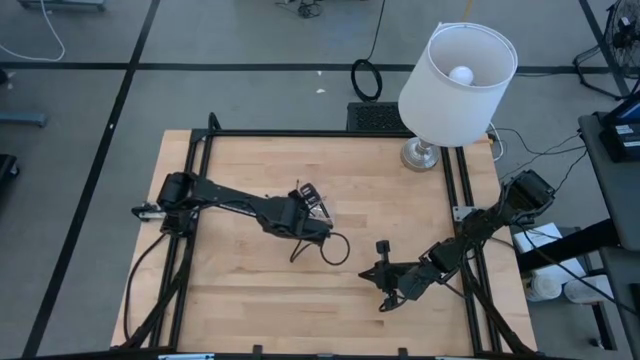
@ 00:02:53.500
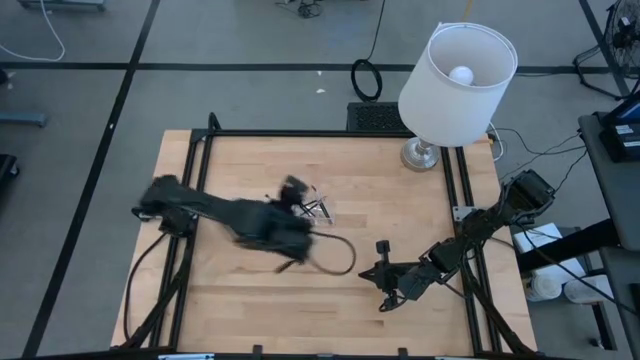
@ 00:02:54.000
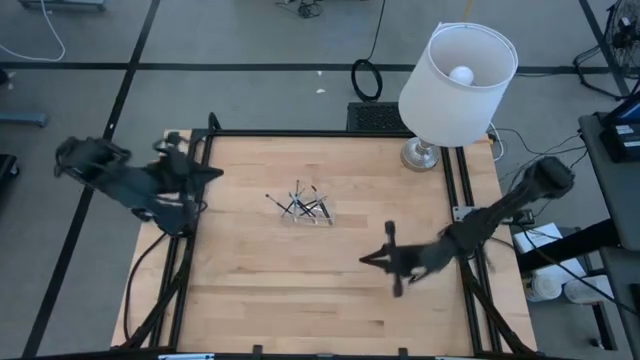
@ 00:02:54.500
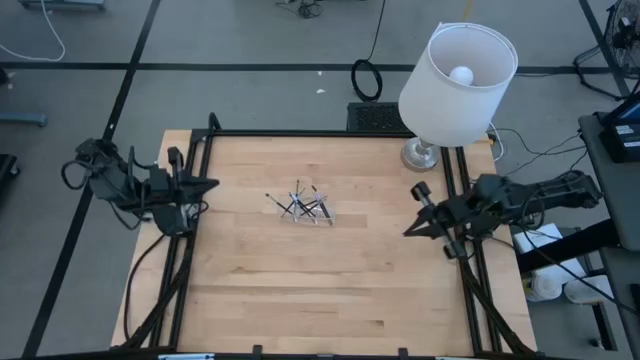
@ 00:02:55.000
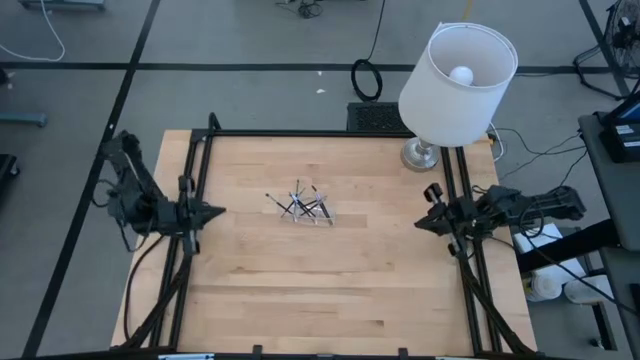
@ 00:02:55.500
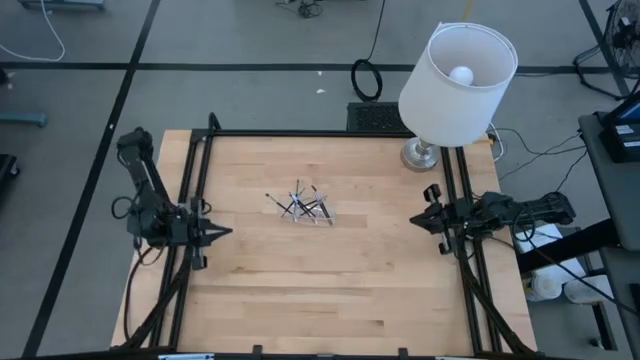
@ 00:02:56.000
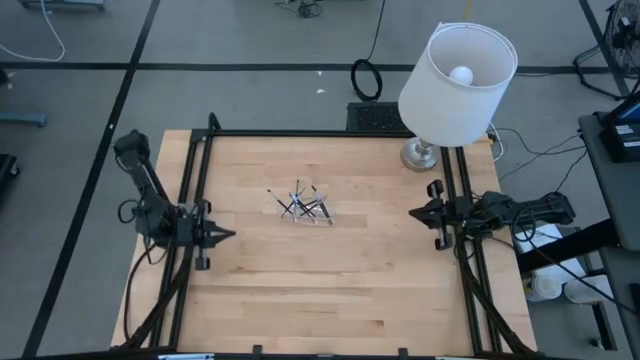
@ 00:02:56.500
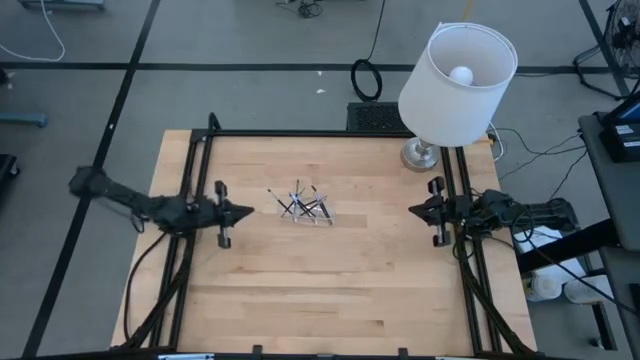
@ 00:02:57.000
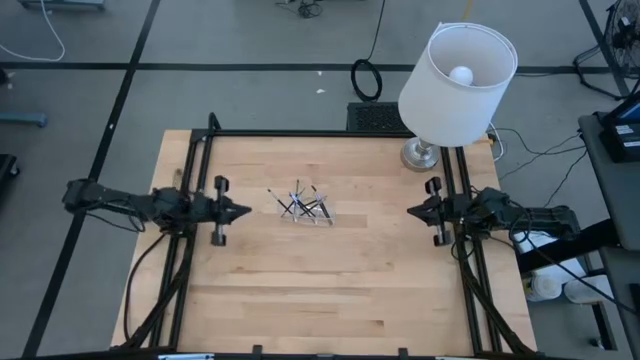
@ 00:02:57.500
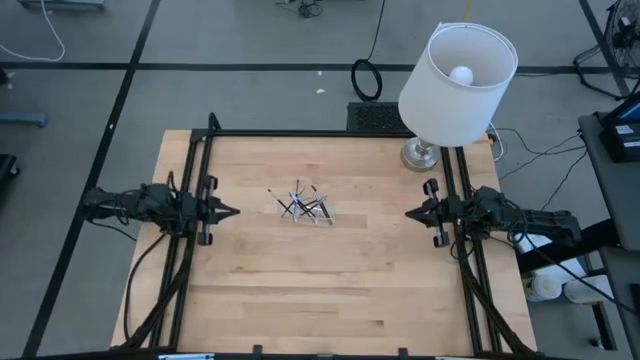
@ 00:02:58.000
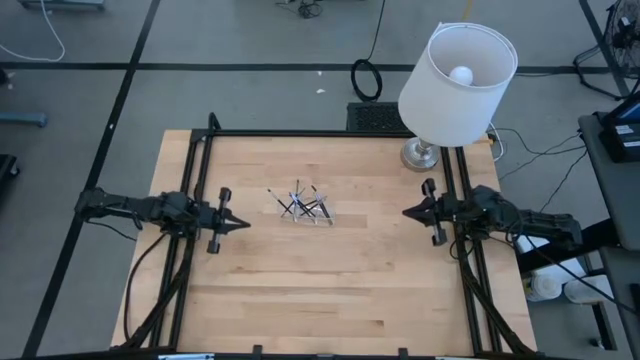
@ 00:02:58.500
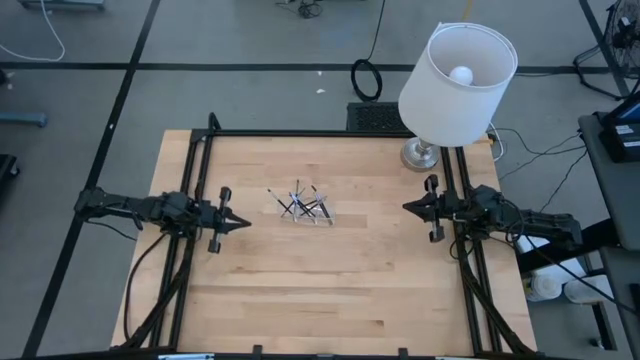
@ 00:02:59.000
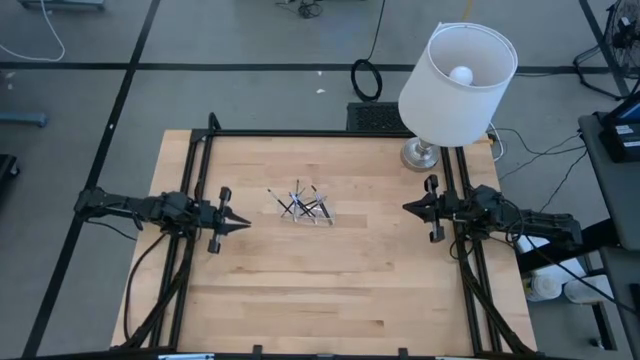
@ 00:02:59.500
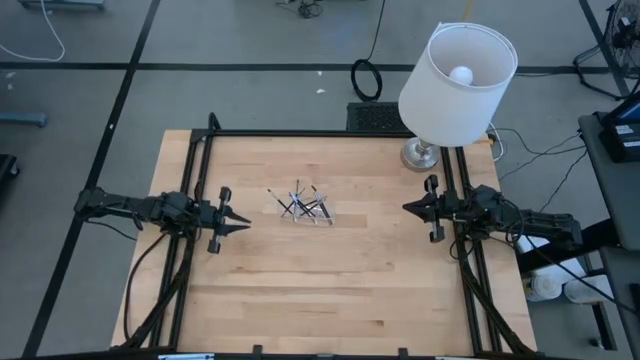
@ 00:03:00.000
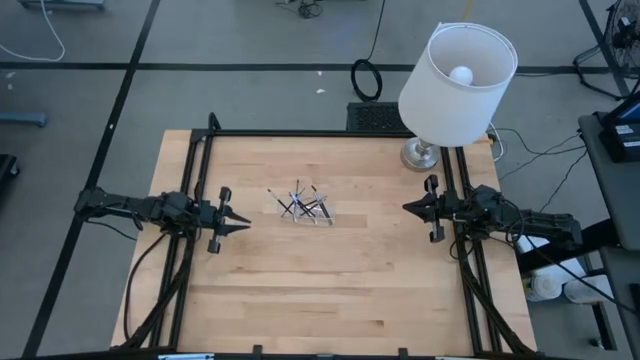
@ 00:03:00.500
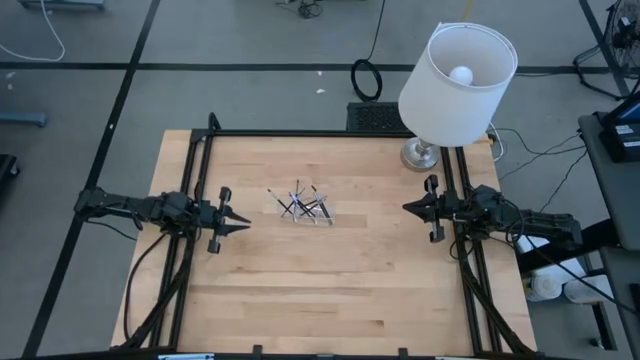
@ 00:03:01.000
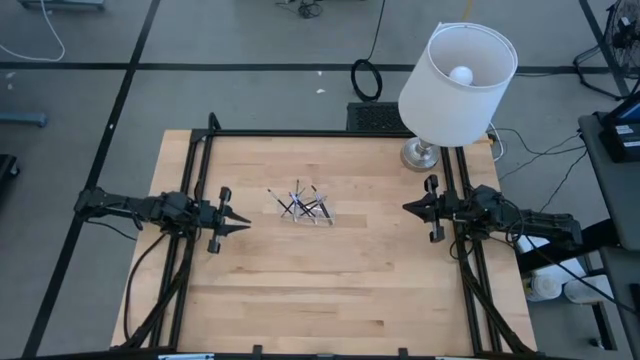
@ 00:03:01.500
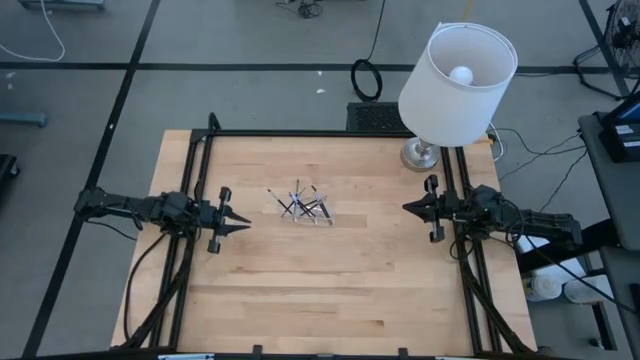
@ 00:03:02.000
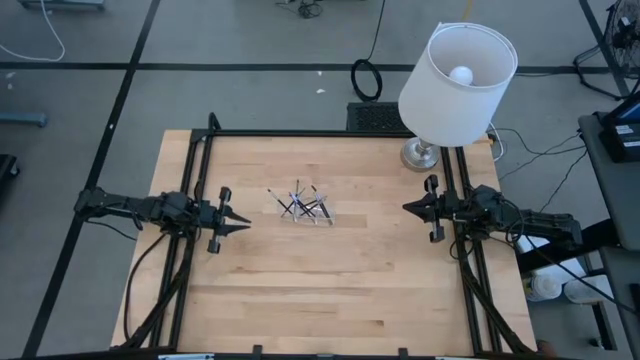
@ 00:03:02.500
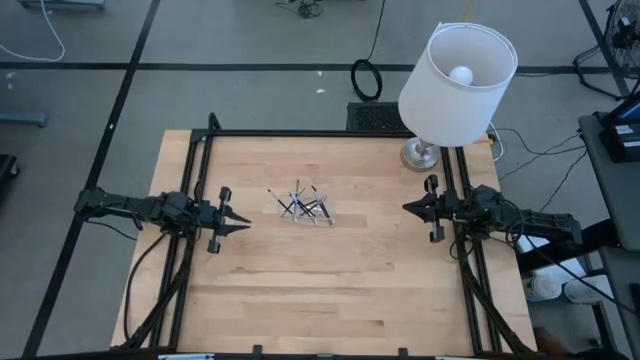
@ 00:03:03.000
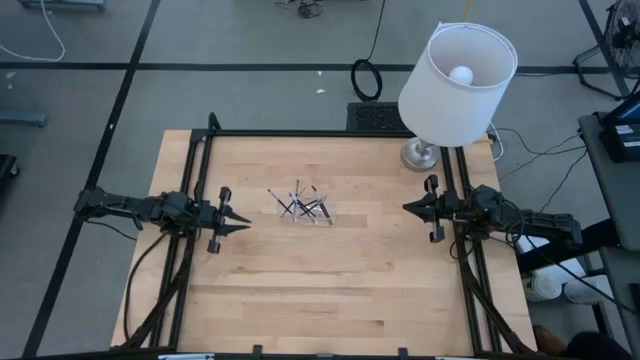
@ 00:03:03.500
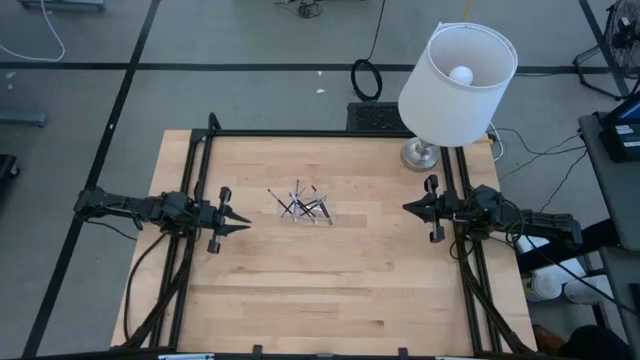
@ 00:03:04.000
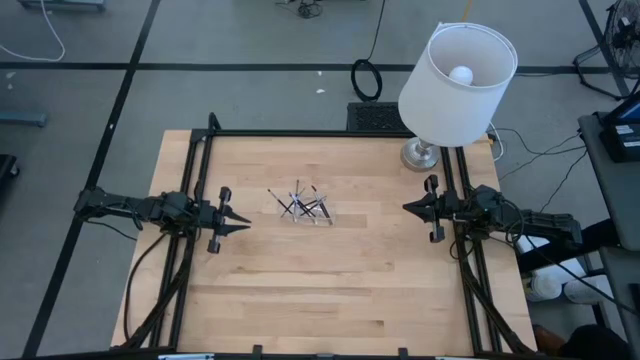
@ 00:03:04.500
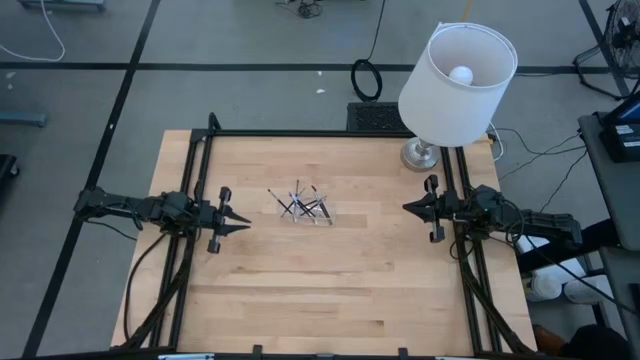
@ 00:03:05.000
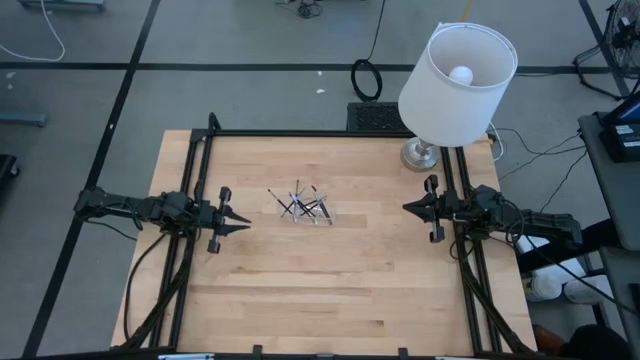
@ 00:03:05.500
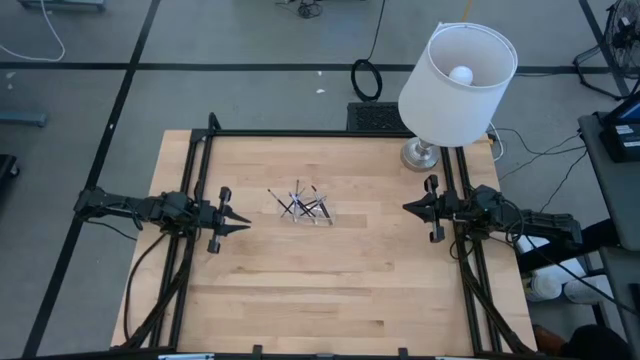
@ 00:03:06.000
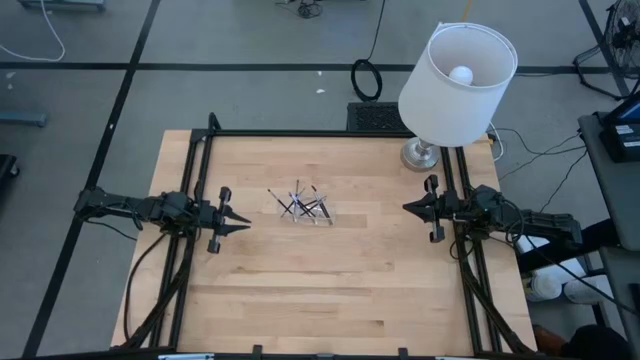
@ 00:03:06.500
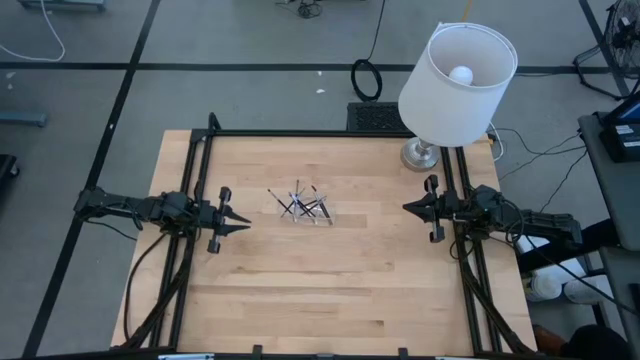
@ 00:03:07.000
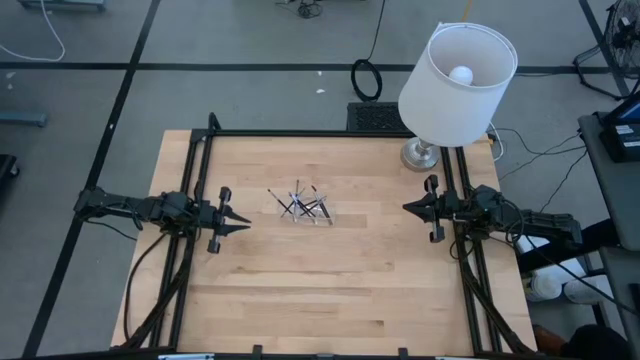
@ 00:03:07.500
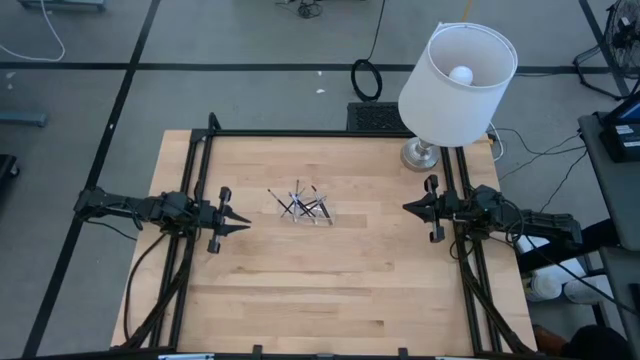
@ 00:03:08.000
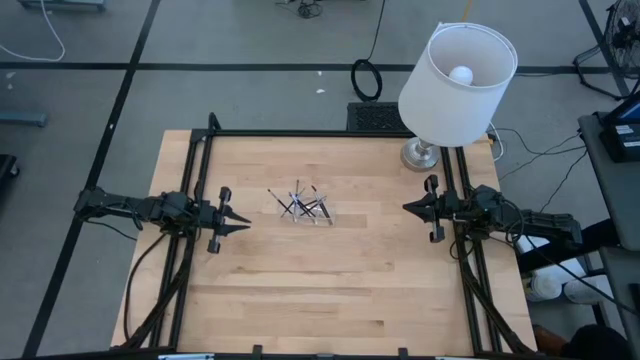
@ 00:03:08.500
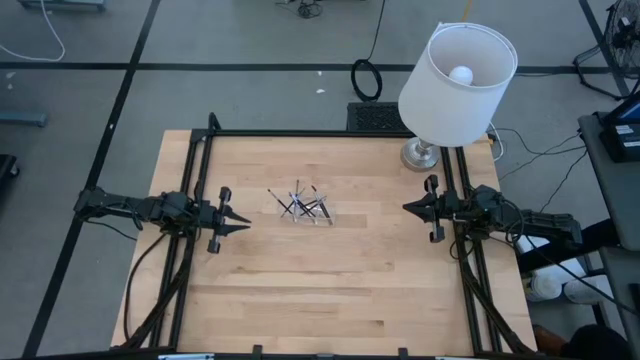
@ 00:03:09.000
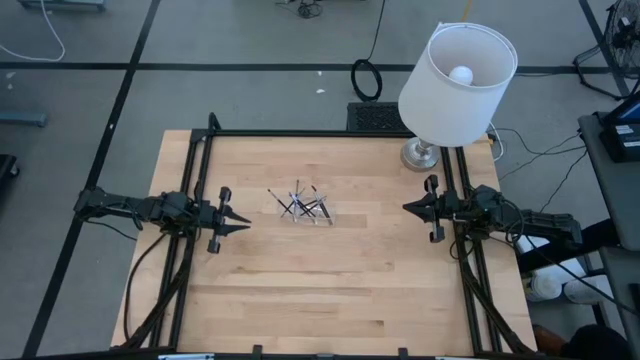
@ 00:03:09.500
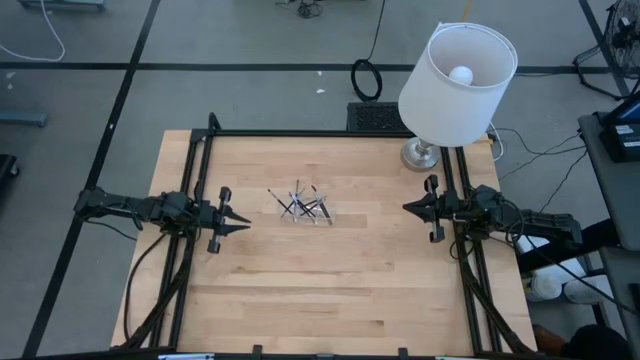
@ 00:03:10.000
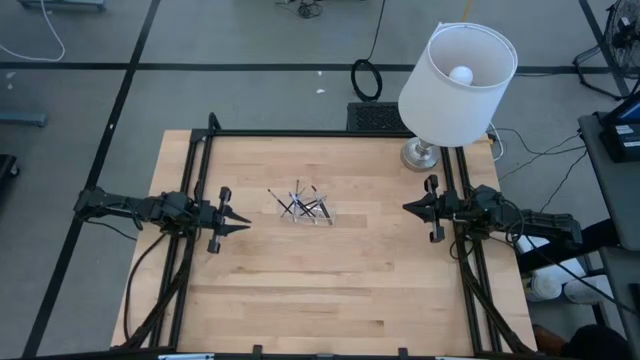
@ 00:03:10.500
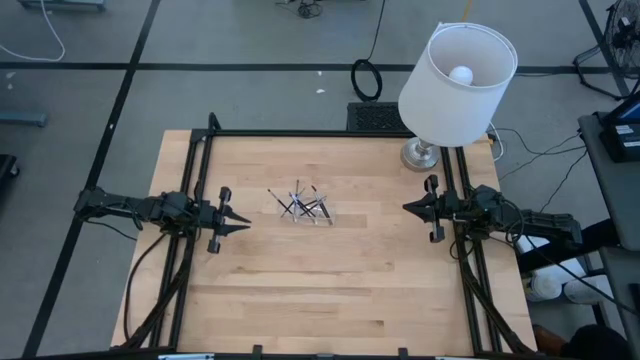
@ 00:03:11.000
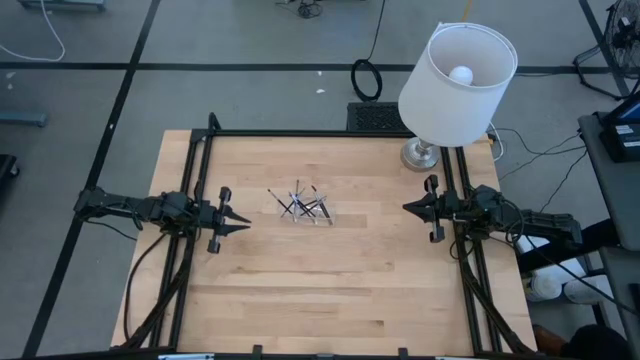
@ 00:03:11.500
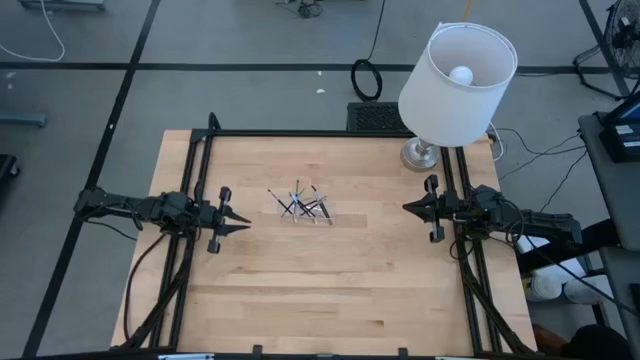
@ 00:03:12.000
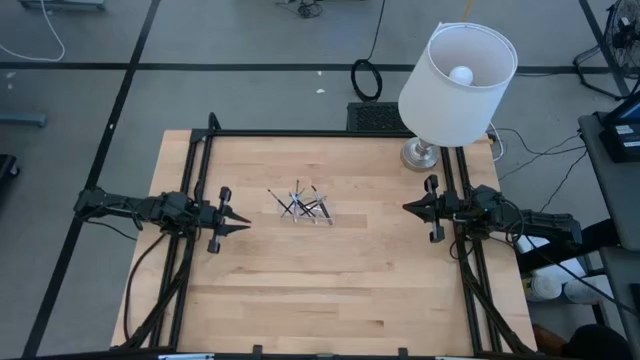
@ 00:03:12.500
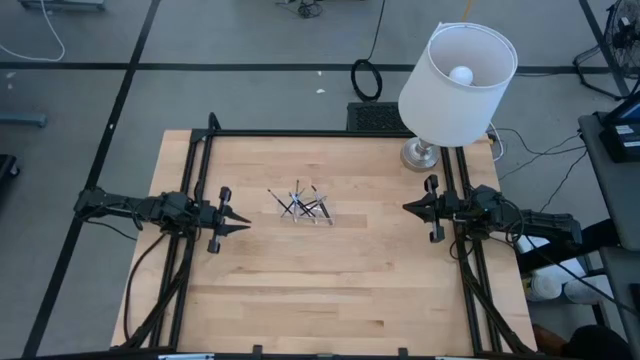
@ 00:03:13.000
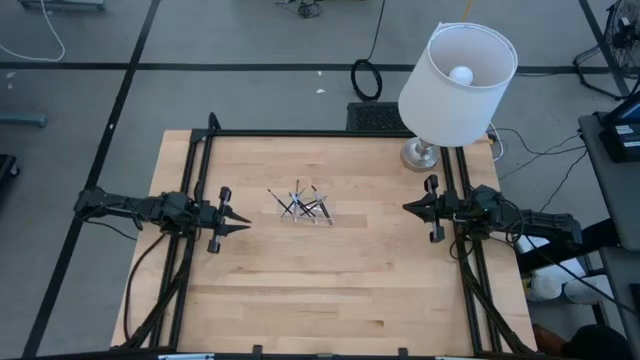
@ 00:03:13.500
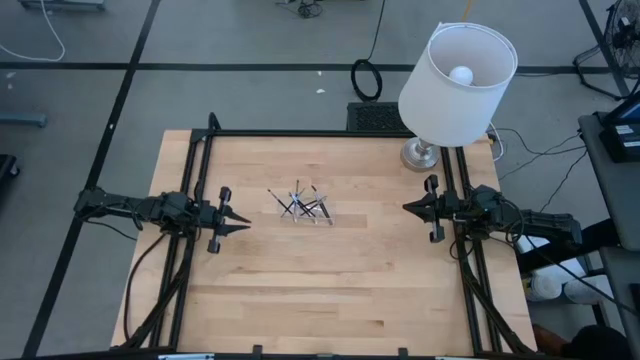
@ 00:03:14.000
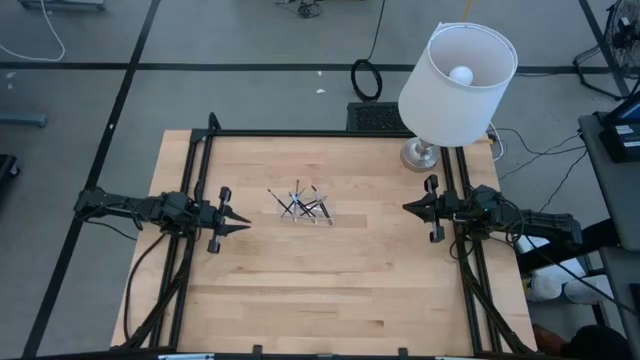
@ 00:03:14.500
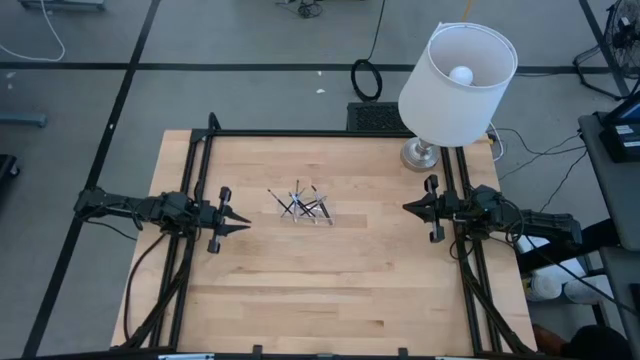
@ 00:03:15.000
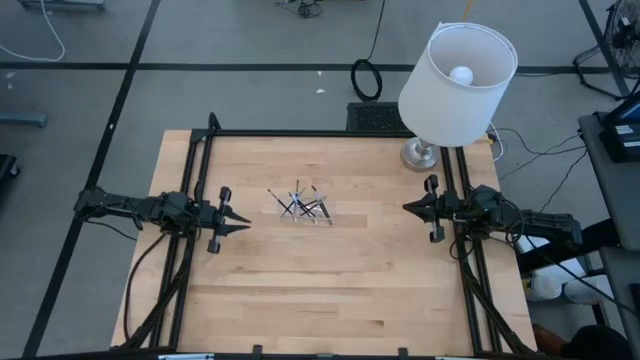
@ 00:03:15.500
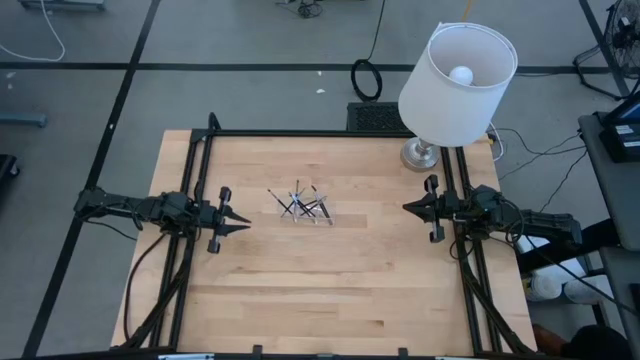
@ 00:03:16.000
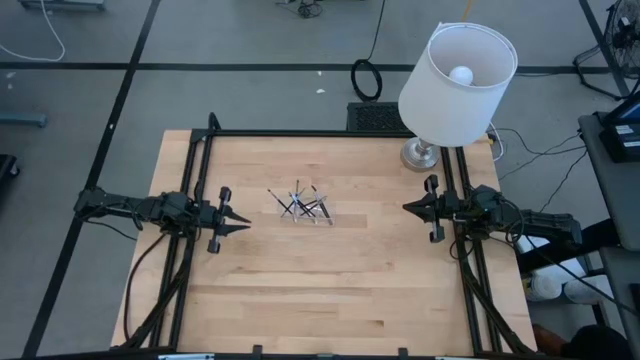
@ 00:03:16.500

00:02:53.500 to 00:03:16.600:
Task: Pick & Place Makeup Supplies
Return to Home Position
